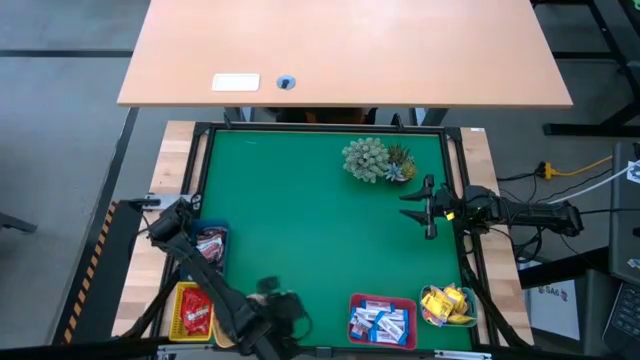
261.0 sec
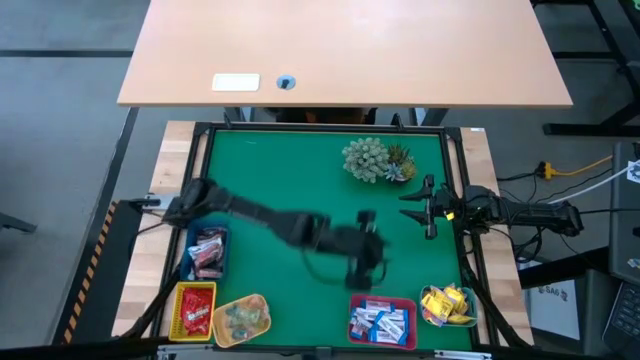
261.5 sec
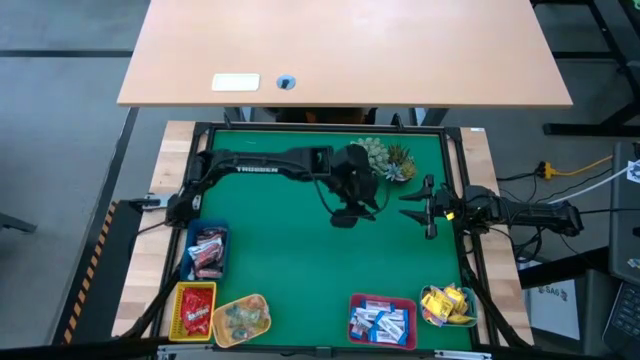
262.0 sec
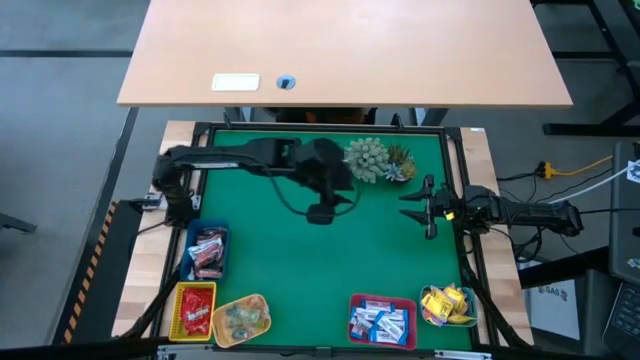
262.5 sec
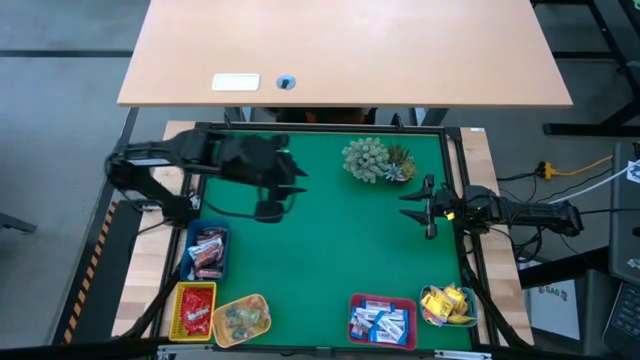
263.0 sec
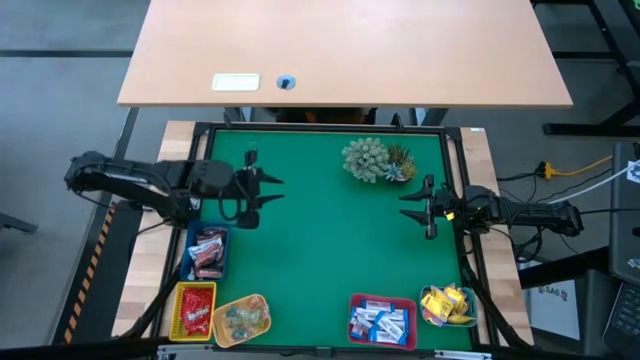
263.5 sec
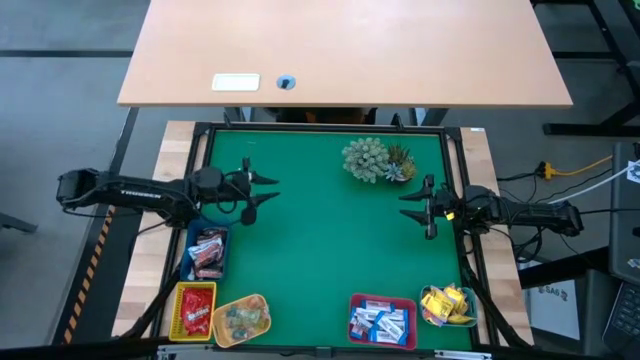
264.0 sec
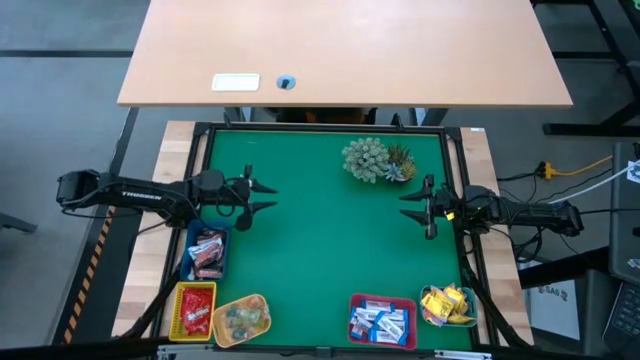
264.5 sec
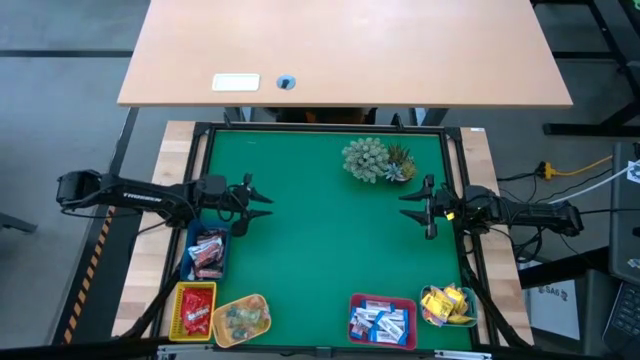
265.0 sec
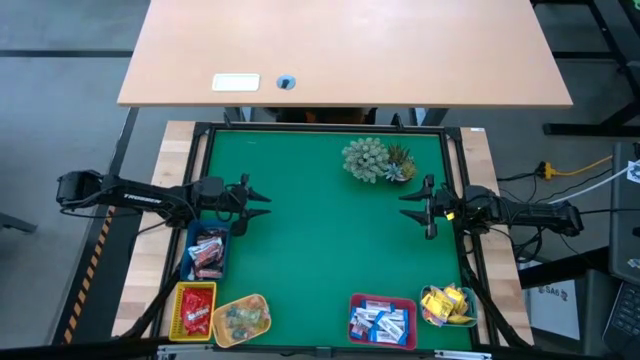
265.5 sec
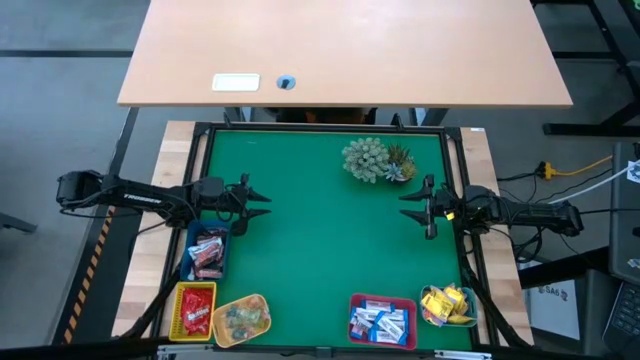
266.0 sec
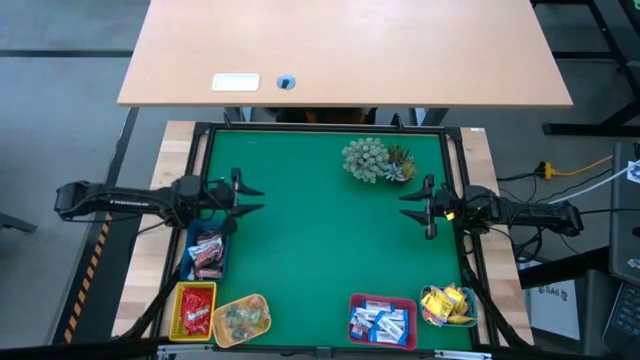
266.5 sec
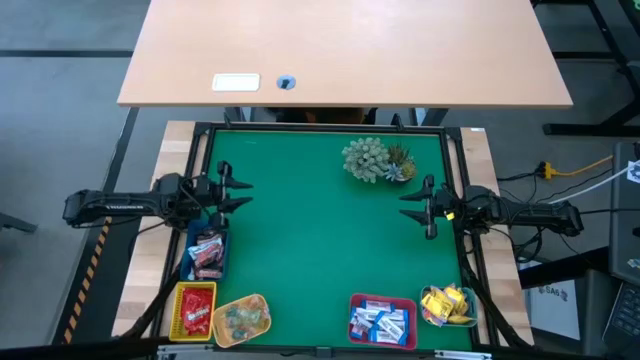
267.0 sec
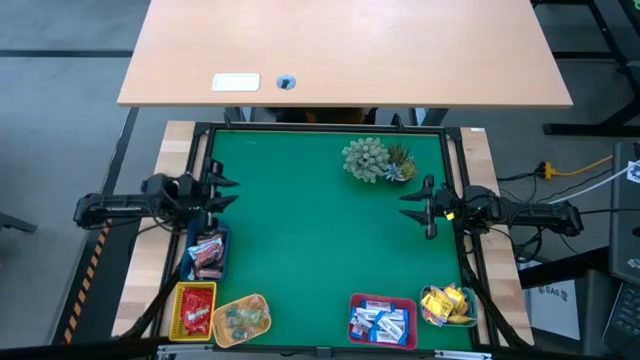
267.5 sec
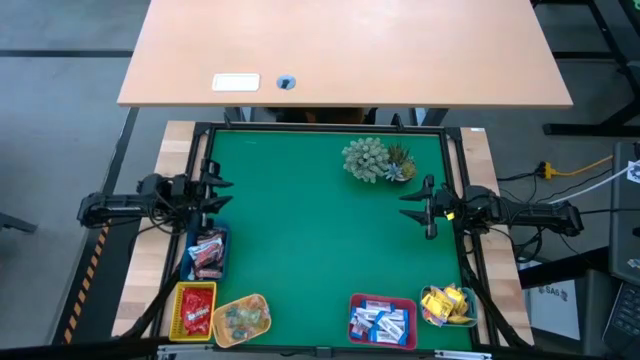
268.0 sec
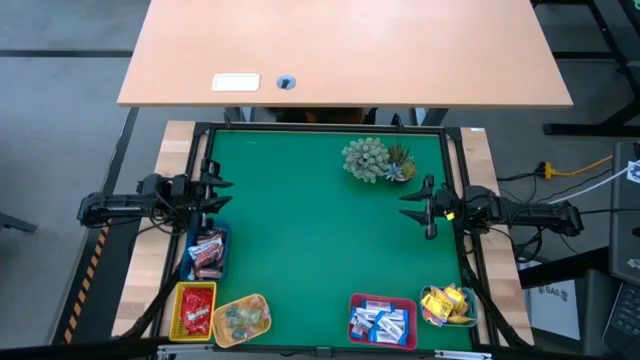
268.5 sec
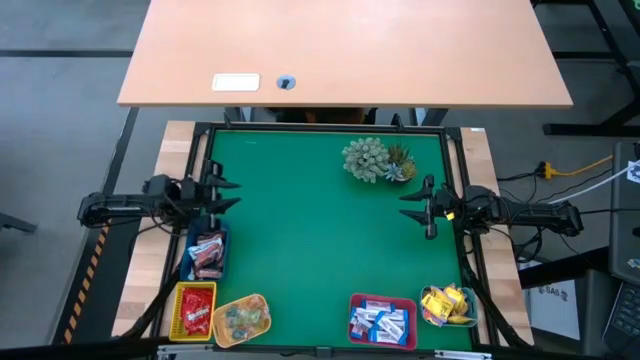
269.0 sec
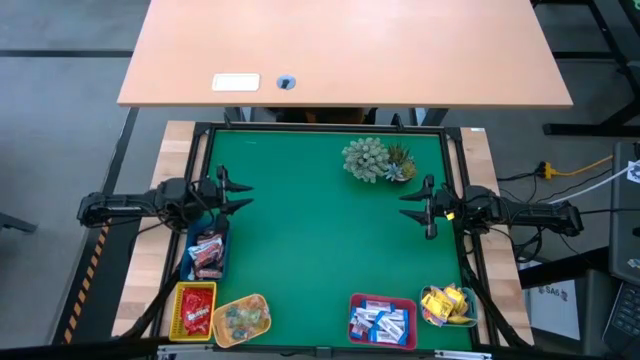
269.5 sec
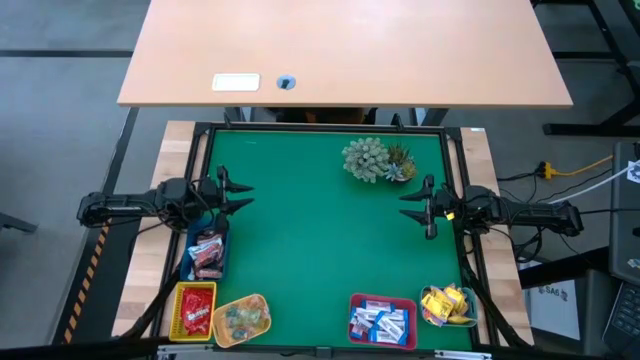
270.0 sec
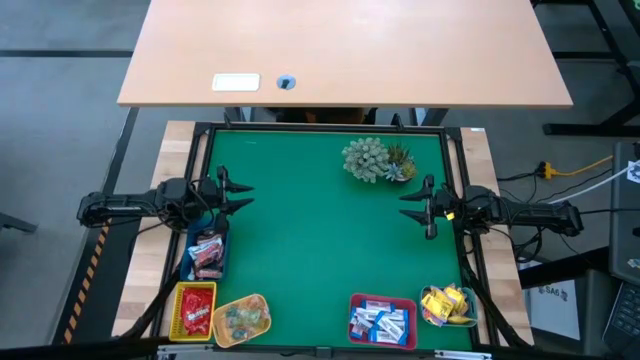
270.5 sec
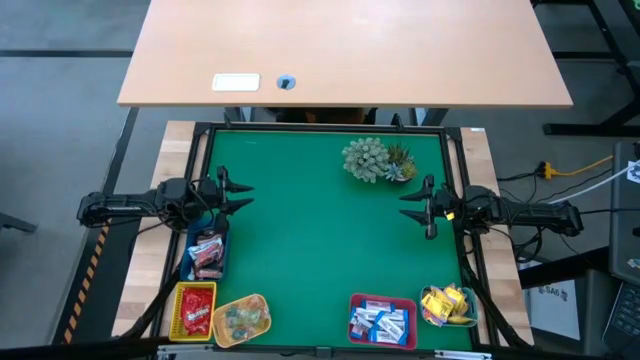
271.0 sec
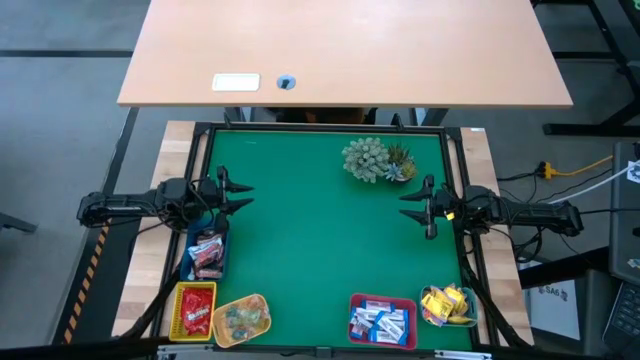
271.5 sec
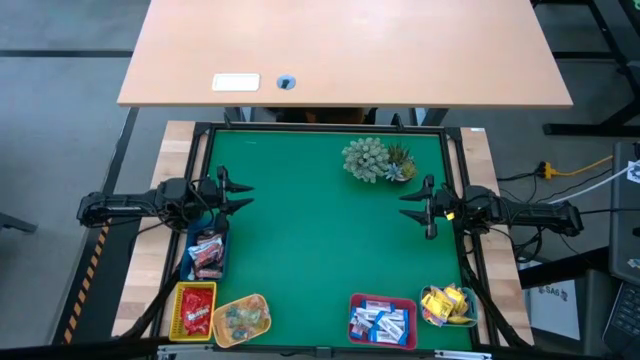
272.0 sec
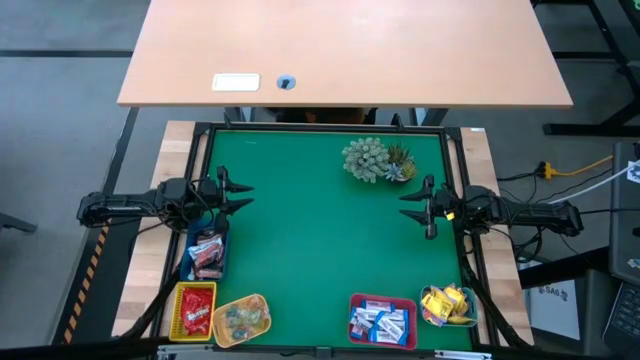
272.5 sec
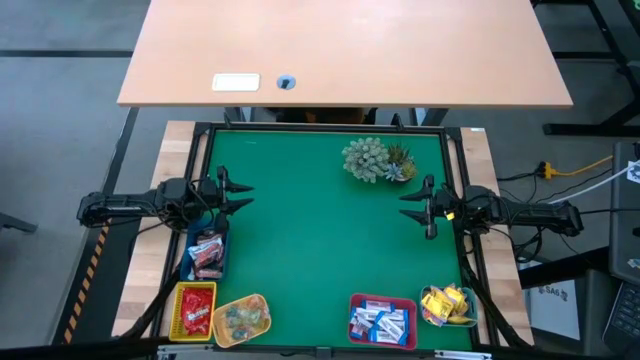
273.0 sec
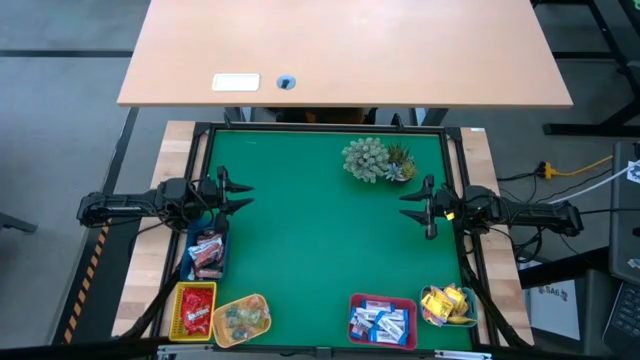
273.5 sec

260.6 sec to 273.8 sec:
Task: Sort candy
Return to Home Position

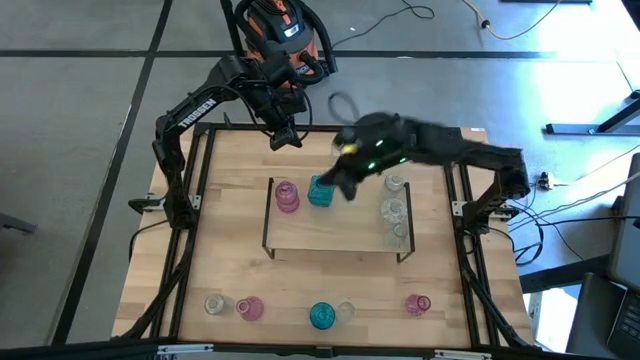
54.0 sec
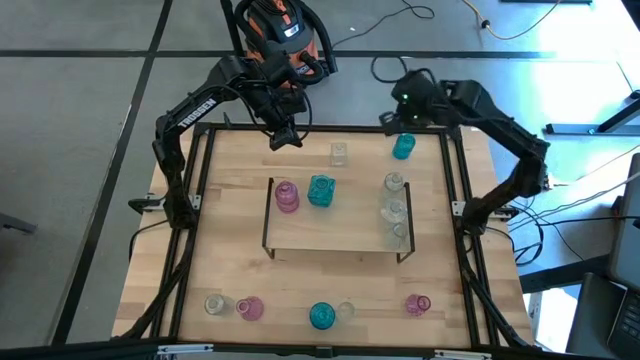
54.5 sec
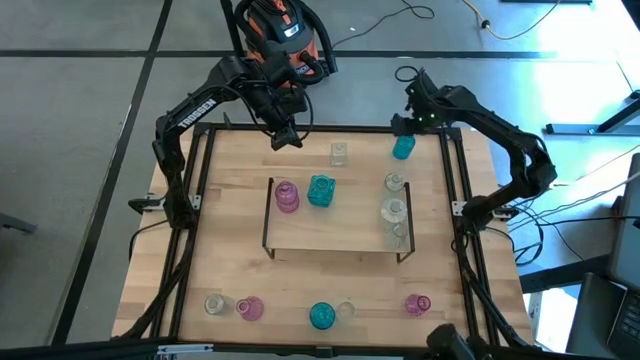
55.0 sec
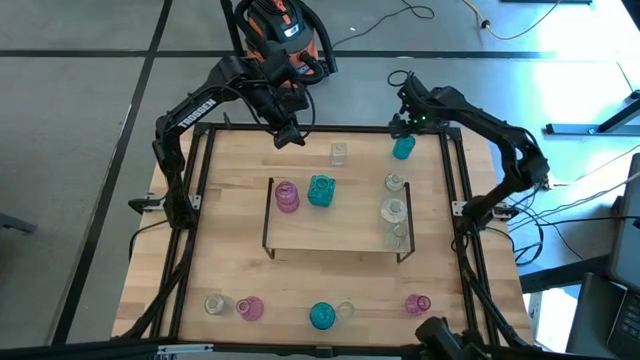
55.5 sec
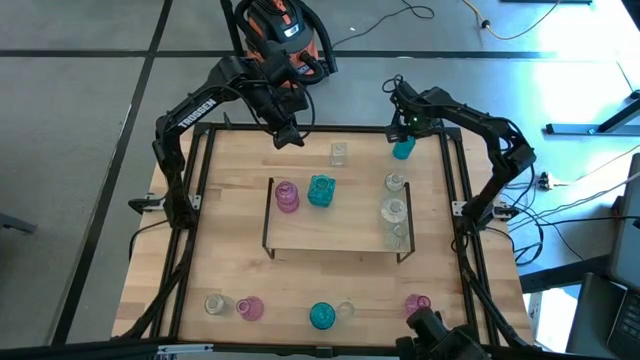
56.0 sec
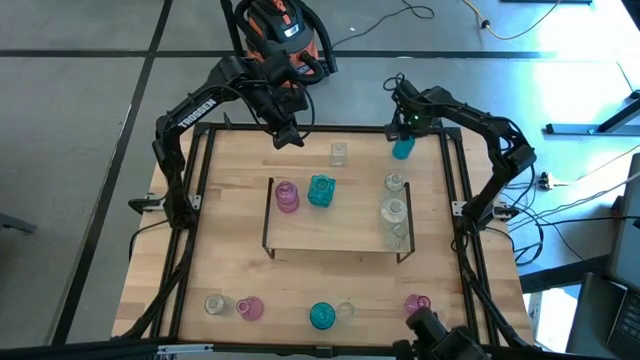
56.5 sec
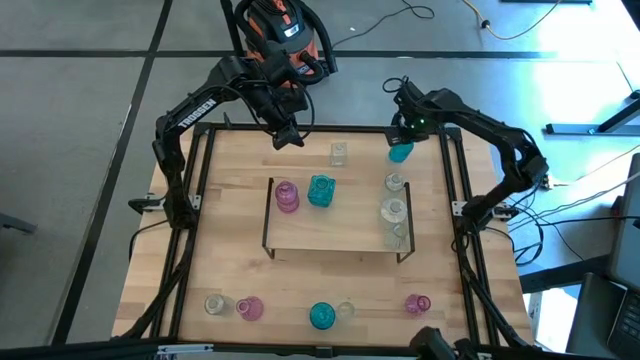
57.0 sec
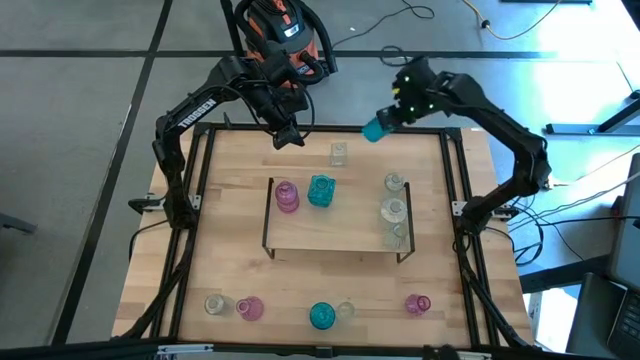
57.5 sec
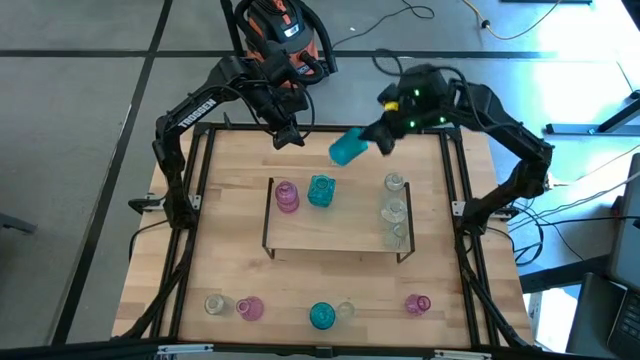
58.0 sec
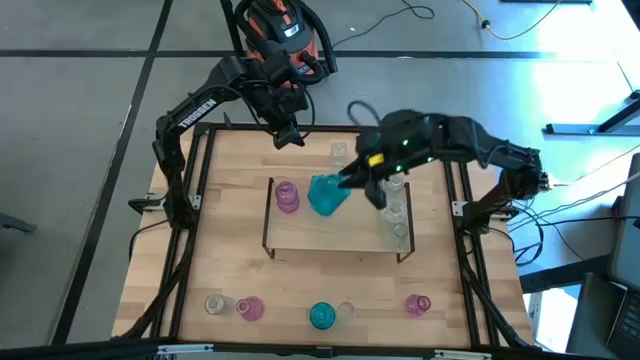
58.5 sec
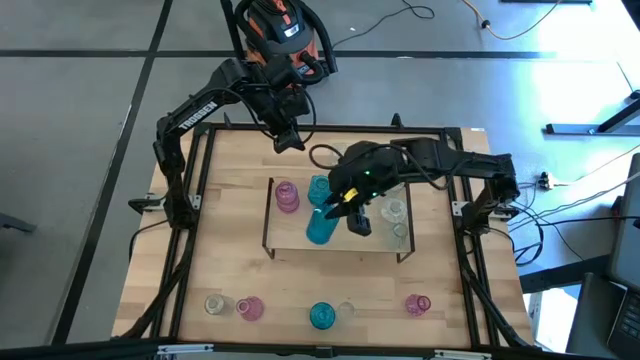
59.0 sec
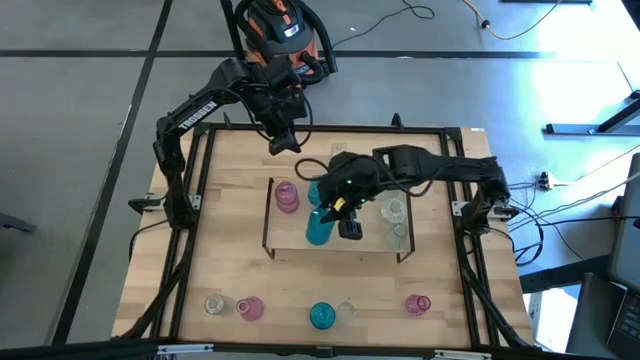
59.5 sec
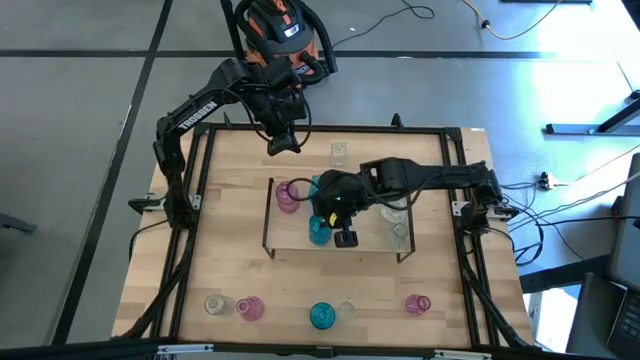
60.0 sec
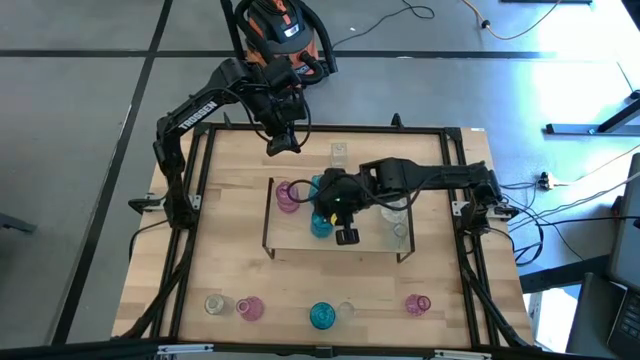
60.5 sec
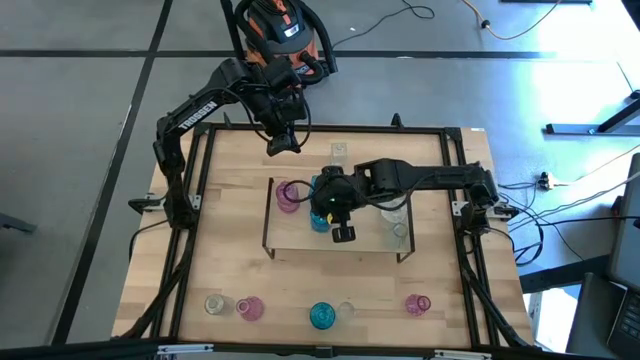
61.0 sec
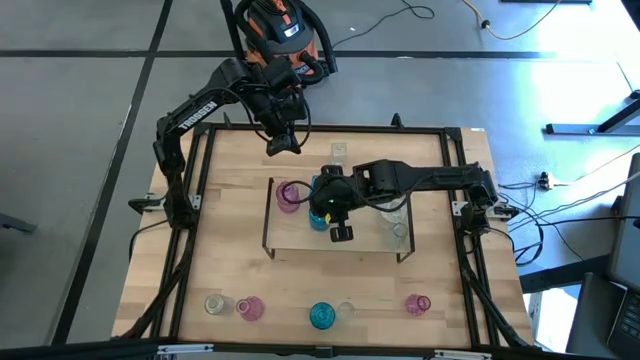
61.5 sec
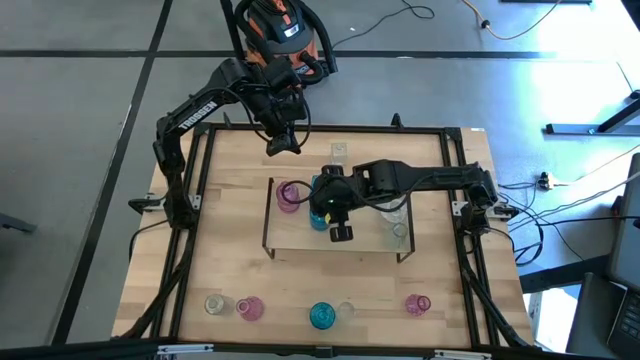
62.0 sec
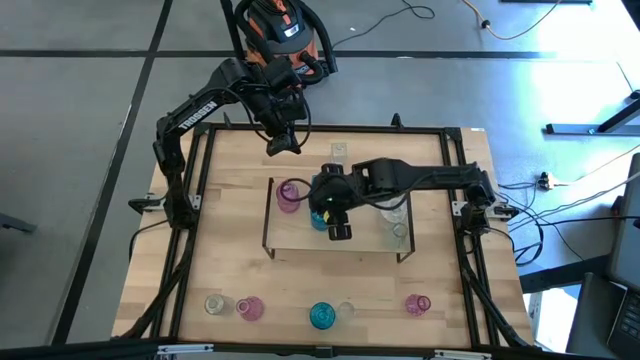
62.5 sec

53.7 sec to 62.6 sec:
Task: sort vases onto shelf
Put the blue vase on the shelf aligned with the other blue vase
